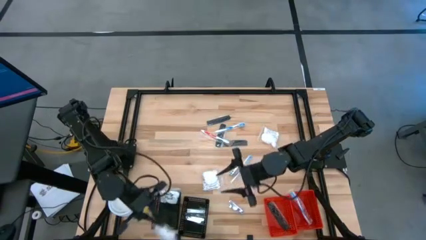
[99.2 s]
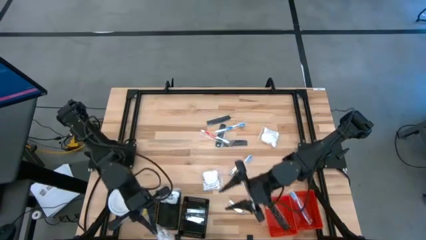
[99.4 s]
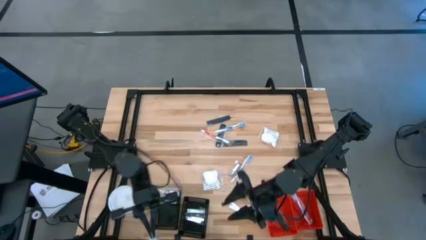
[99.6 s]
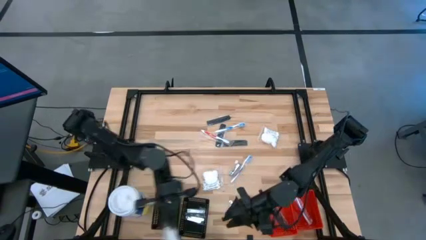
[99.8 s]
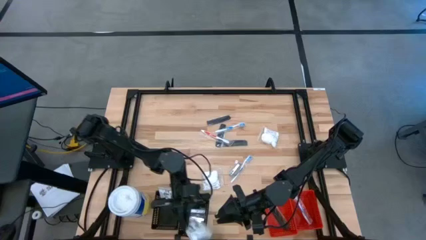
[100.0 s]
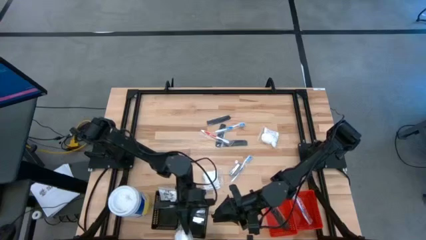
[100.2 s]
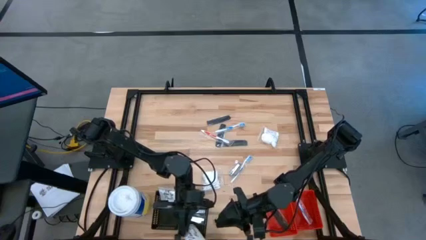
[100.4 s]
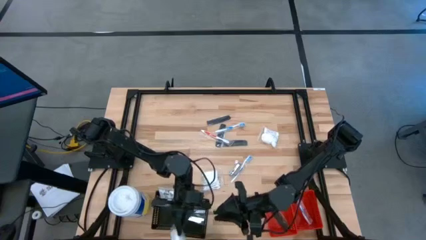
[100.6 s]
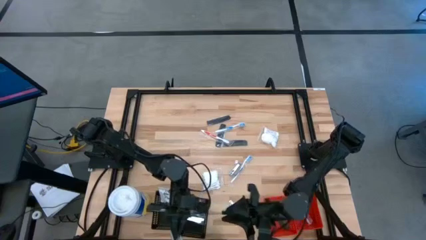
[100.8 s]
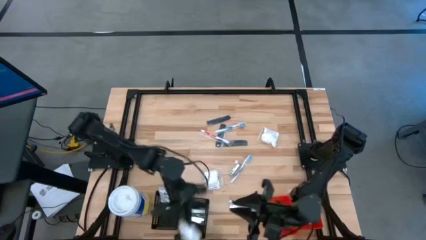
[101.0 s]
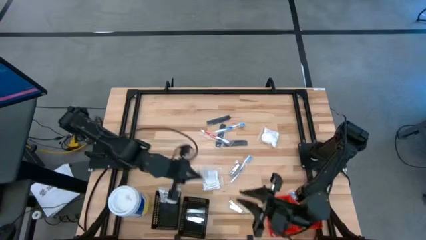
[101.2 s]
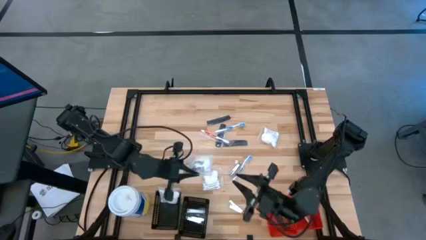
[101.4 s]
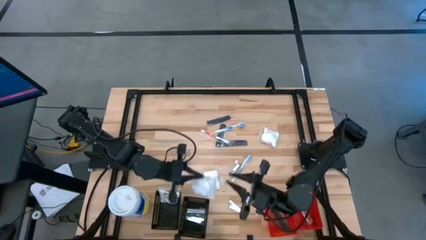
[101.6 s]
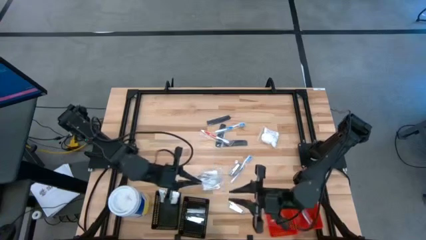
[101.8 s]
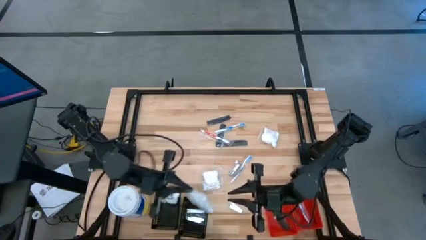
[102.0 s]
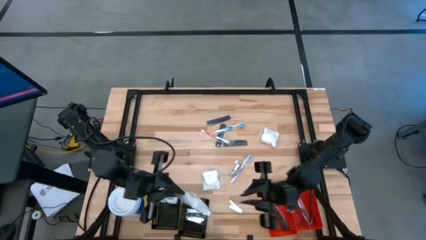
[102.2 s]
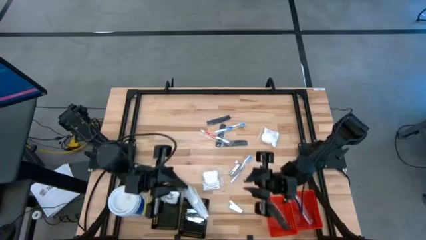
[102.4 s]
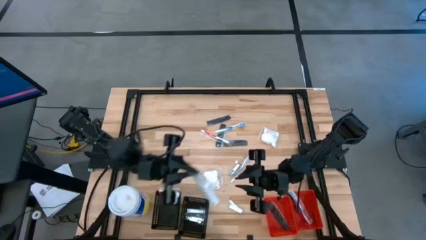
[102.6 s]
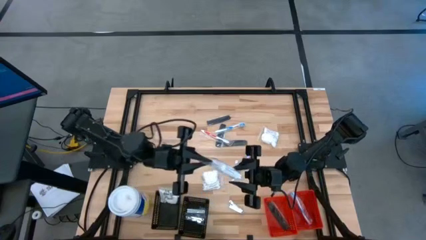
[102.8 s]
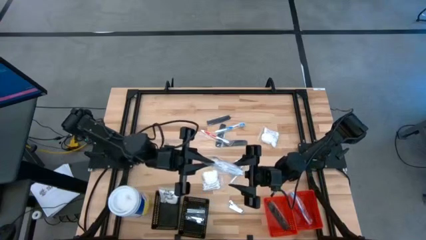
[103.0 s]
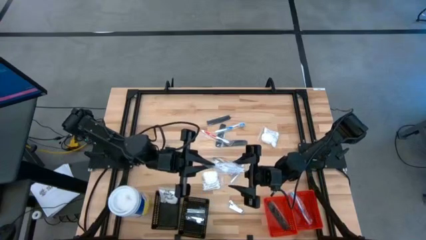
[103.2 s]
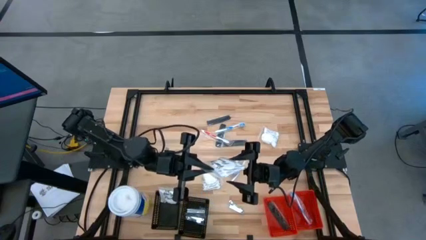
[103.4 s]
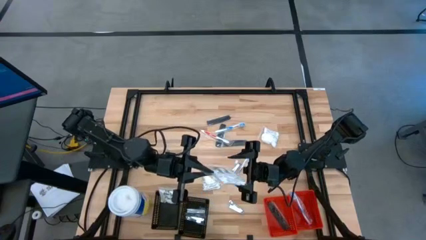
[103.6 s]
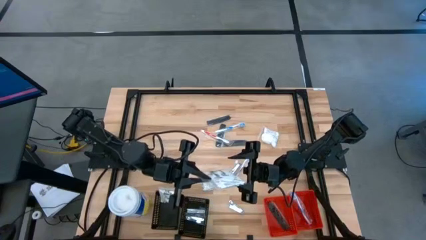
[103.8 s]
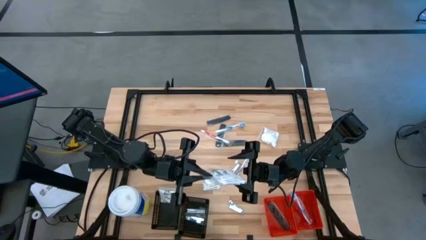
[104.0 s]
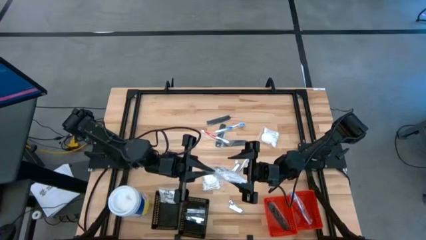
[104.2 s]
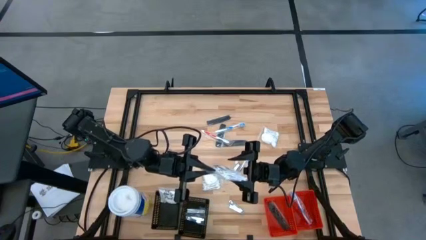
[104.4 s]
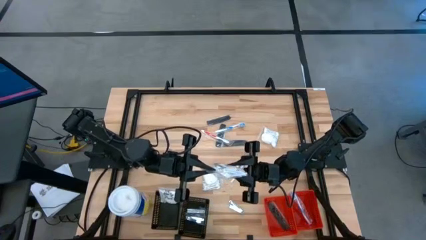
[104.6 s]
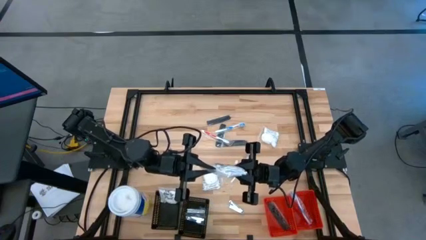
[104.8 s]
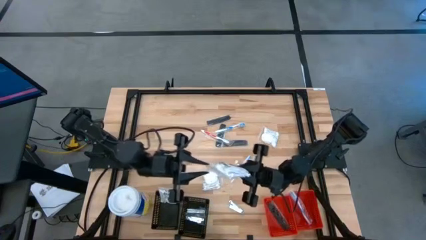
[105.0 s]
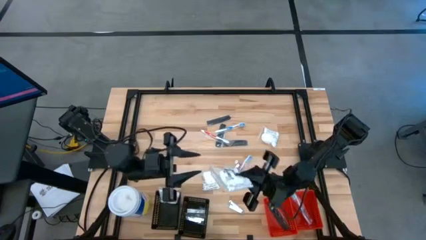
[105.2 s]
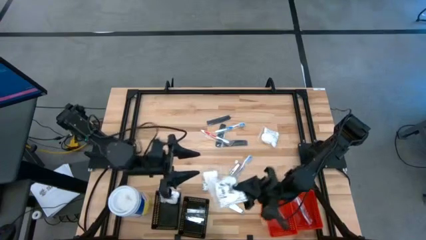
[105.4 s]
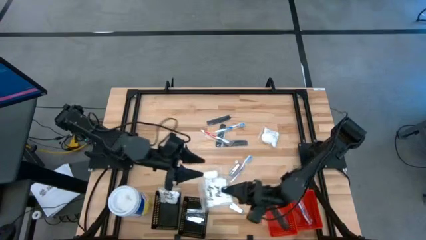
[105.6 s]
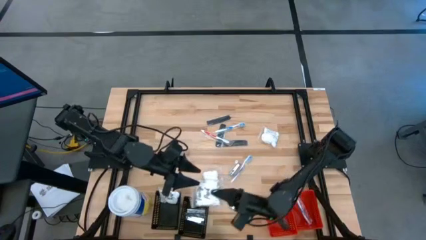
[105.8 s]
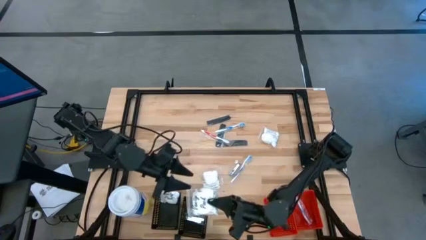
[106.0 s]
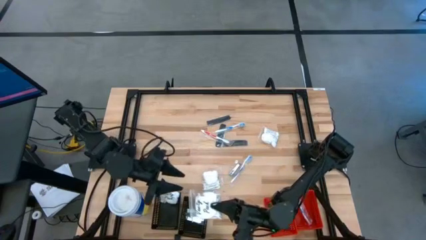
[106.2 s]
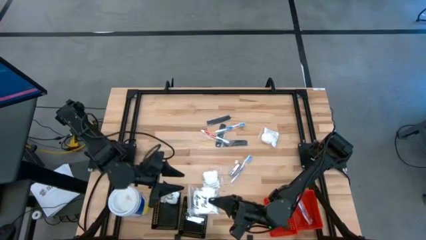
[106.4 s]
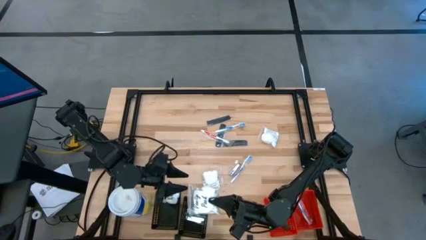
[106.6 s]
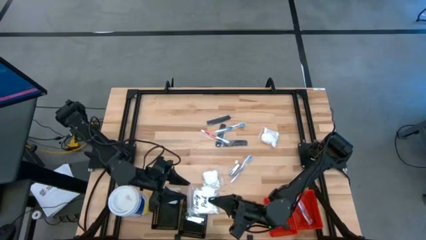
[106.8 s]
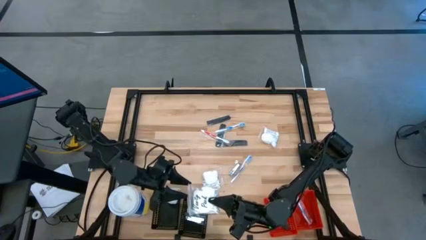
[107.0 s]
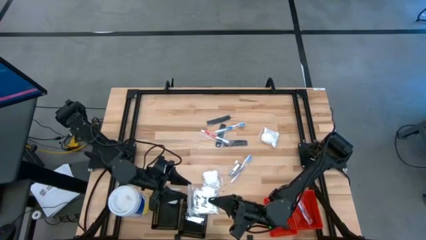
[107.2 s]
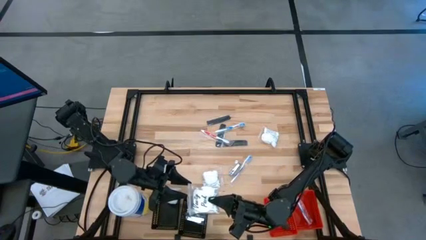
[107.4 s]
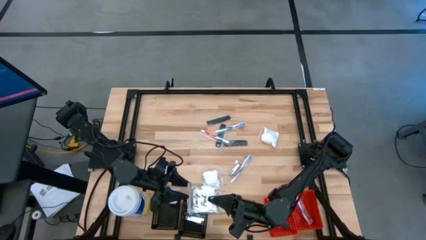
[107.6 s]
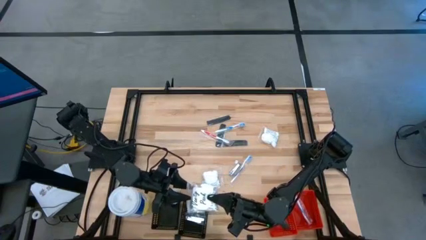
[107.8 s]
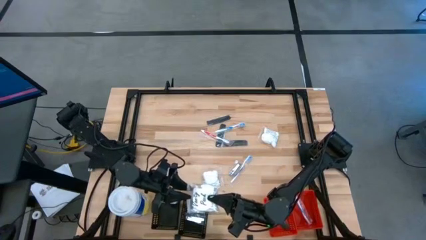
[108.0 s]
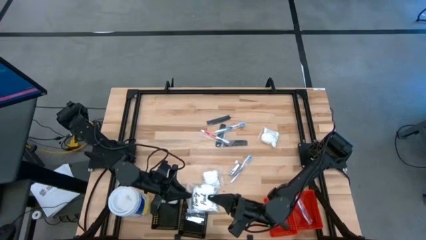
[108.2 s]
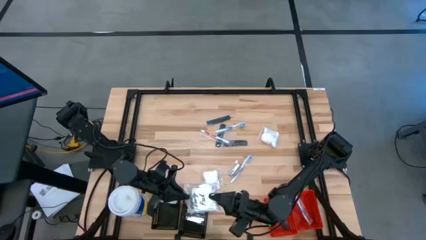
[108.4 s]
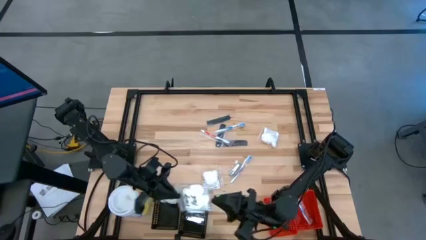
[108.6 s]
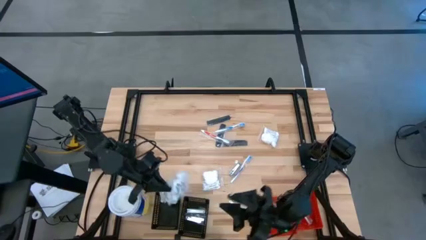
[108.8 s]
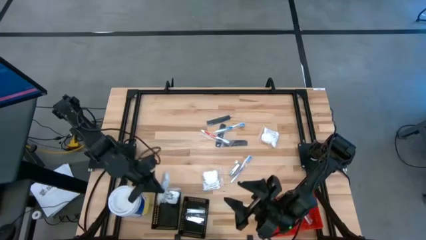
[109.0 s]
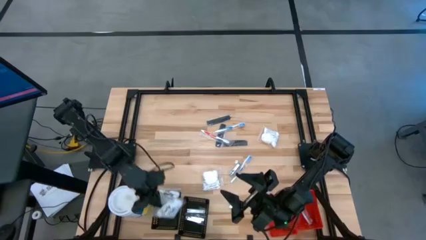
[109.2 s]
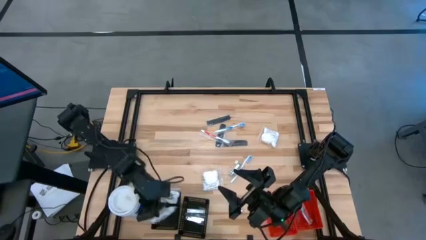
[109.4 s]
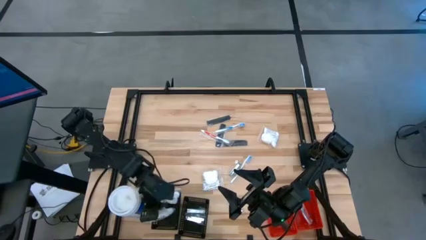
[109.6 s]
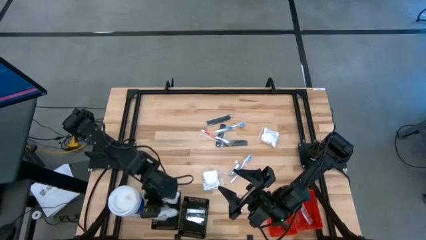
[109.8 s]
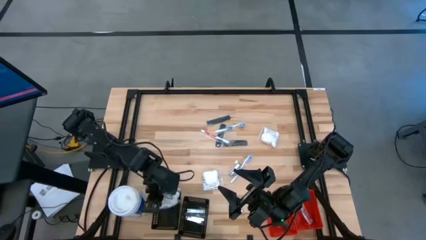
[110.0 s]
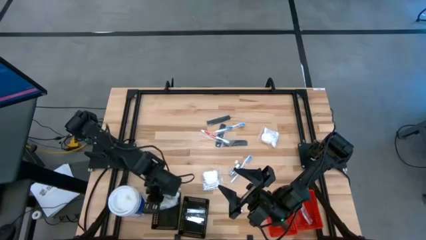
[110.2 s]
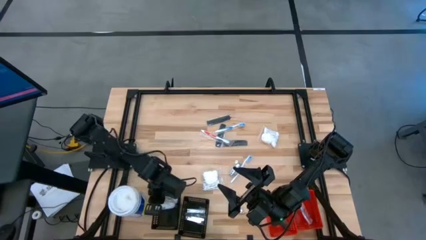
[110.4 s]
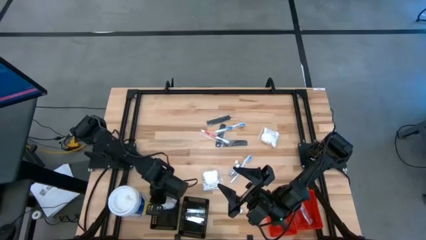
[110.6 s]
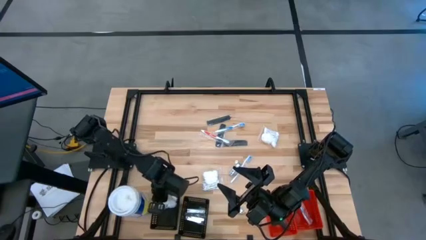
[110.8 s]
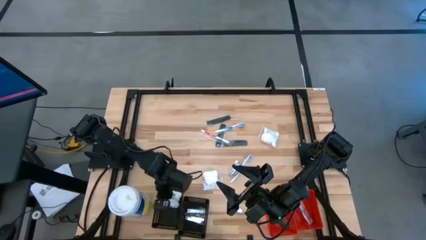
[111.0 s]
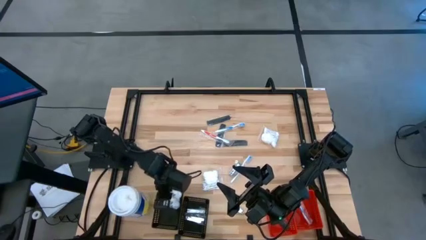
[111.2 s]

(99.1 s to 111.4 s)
Task: Pick & Place Travel size toiletries
Put the cotton pack into the left black bin

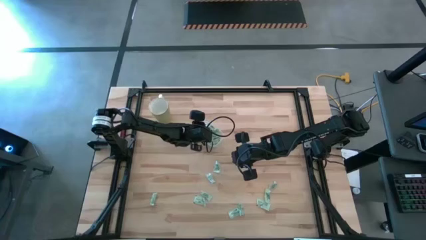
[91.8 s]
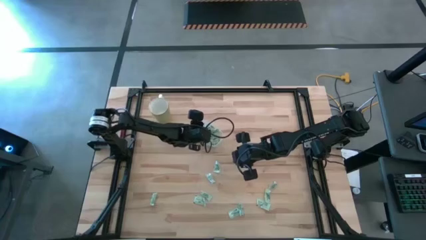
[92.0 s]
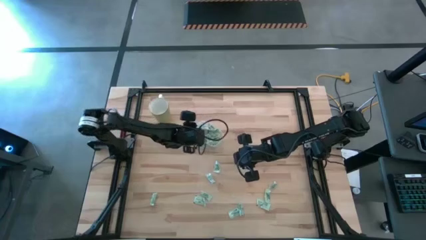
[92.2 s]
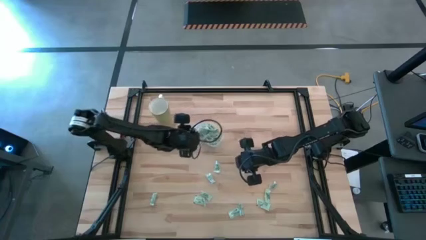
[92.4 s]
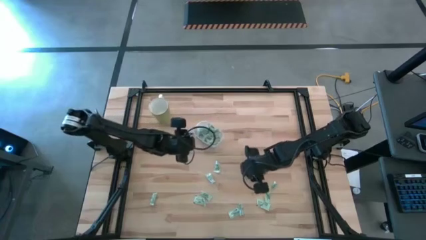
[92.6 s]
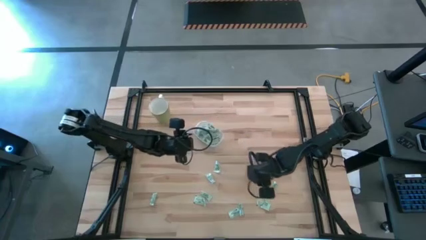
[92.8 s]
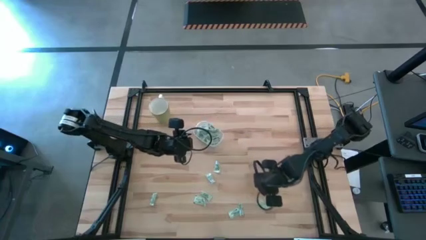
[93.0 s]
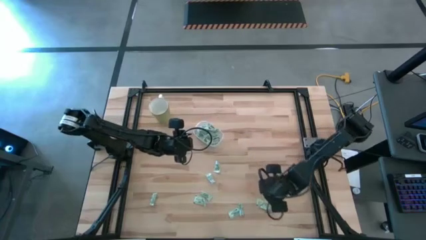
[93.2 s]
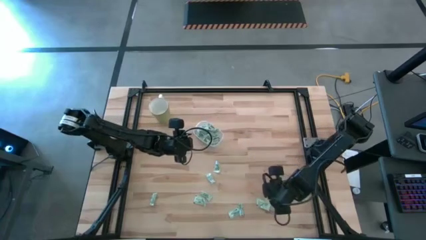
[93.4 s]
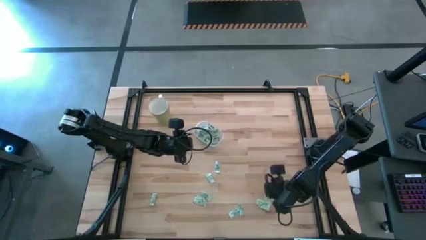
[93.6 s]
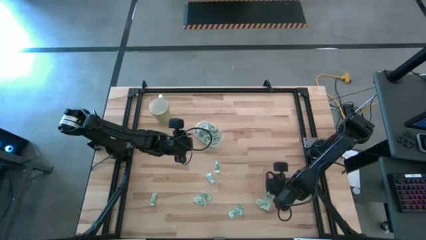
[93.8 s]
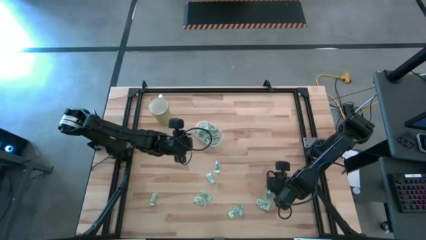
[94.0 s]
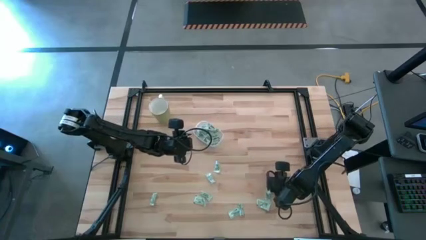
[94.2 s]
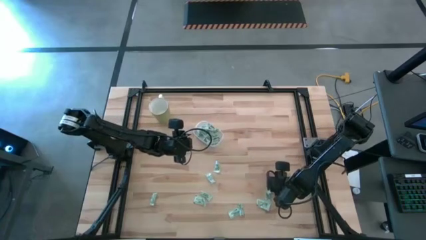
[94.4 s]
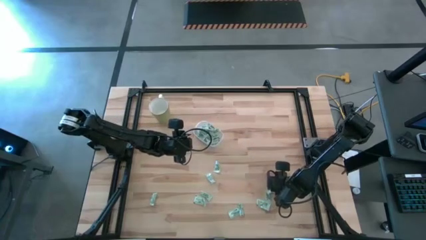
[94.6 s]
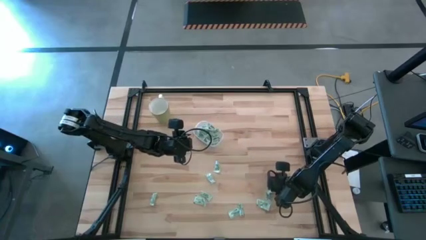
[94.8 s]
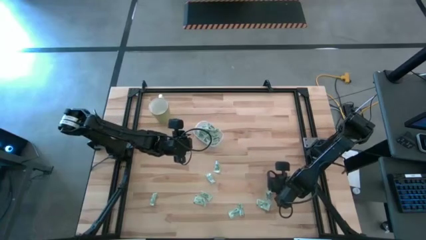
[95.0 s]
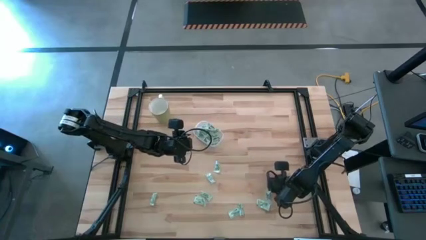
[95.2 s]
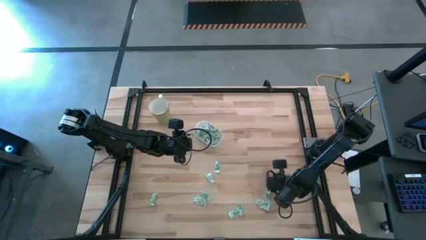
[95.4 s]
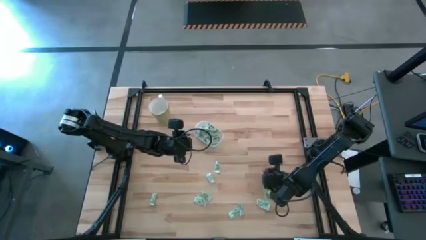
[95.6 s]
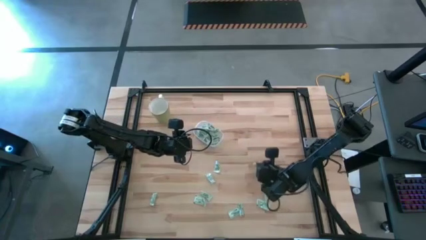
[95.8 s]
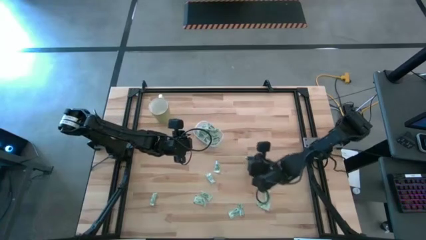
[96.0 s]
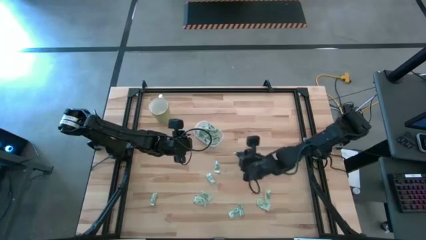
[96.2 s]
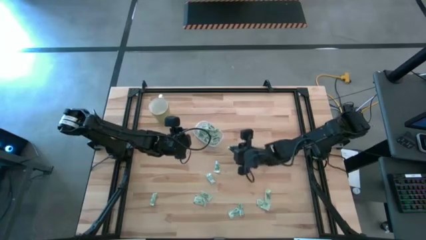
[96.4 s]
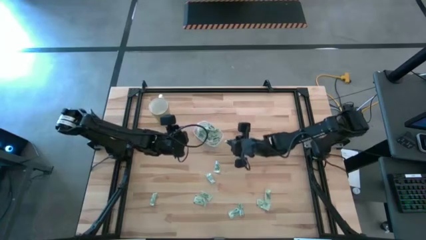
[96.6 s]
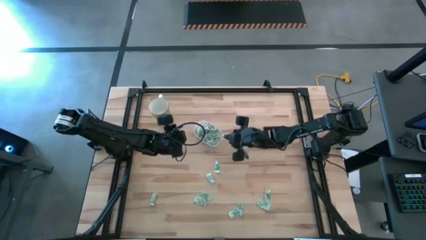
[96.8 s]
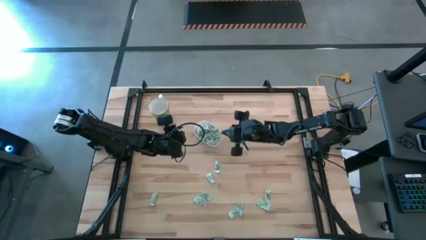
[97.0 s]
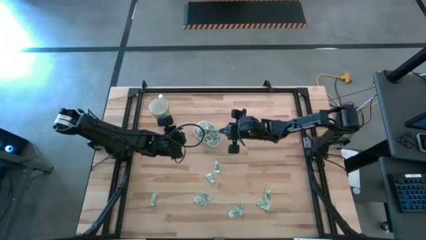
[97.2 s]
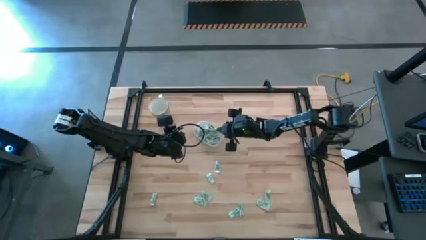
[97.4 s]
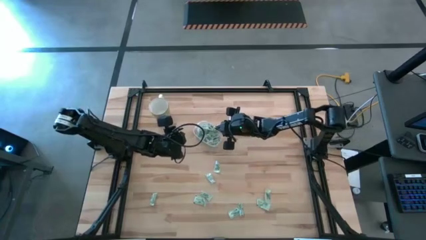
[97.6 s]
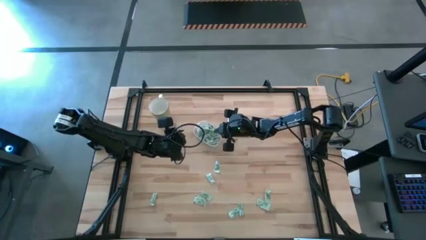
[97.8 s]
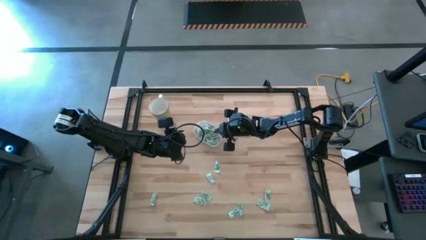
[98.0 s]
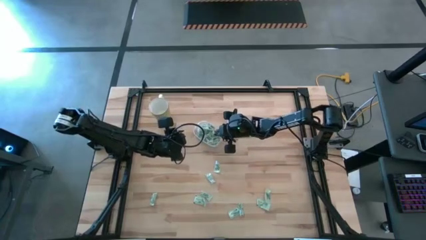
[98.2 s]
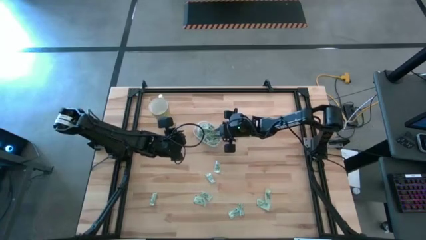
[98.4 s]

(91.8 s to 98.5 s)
Task: Pick and place Stevia / Truvia into bins
Put the stevia packet into the transparent container
